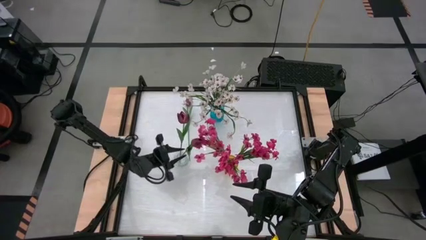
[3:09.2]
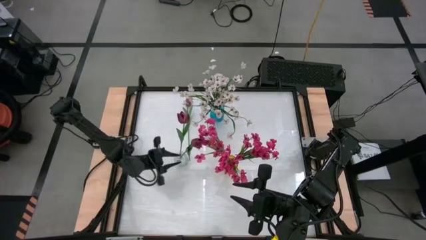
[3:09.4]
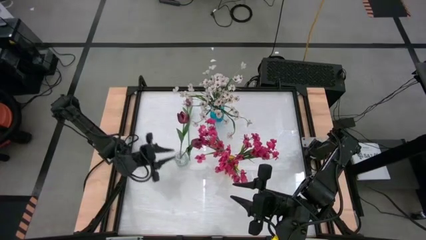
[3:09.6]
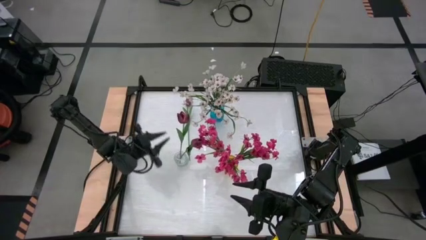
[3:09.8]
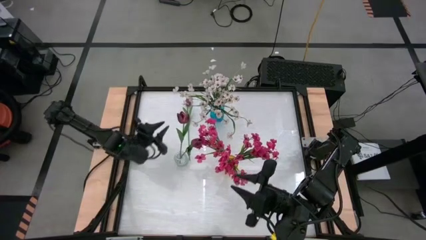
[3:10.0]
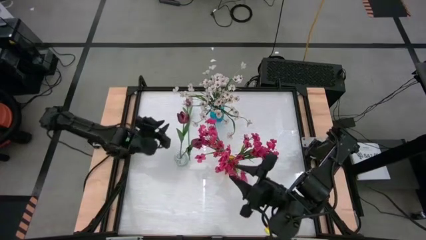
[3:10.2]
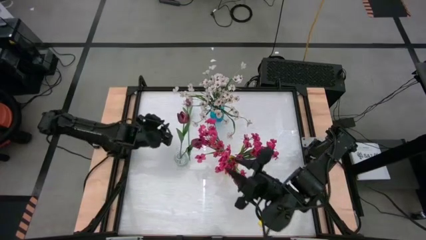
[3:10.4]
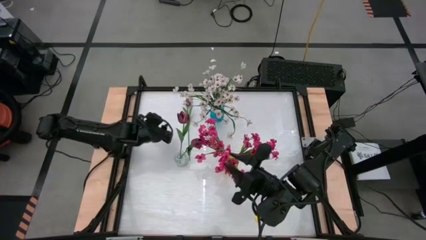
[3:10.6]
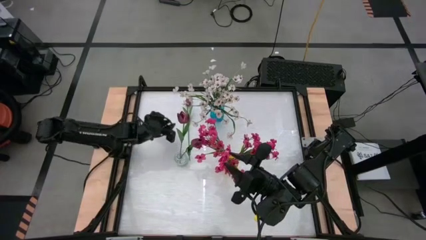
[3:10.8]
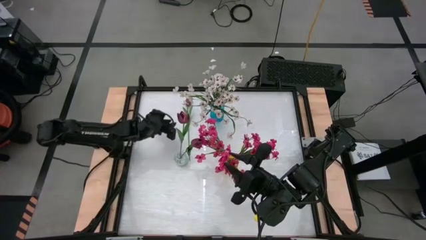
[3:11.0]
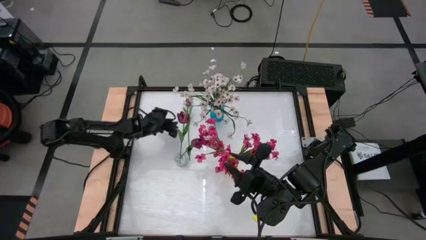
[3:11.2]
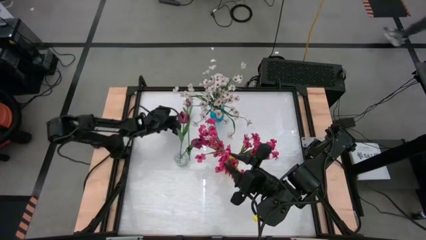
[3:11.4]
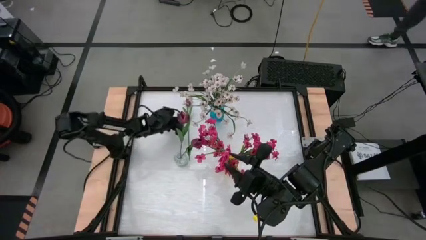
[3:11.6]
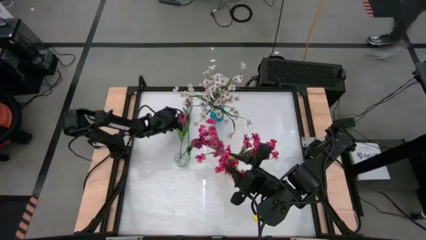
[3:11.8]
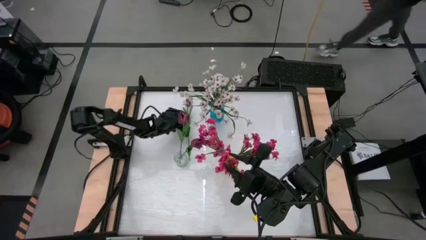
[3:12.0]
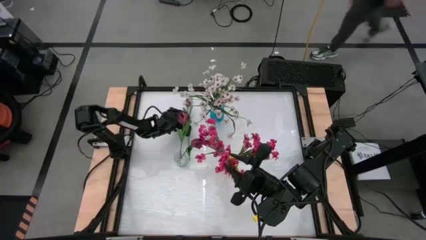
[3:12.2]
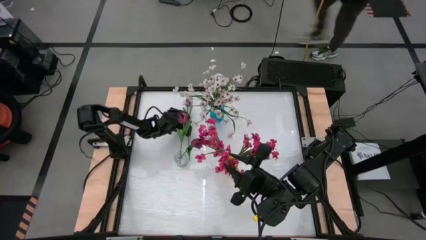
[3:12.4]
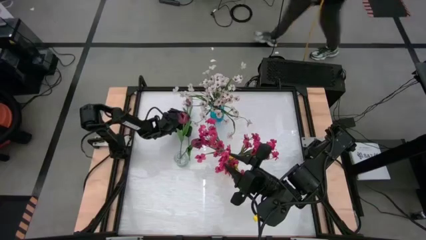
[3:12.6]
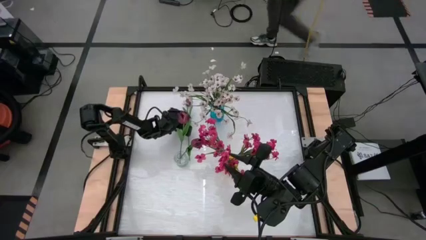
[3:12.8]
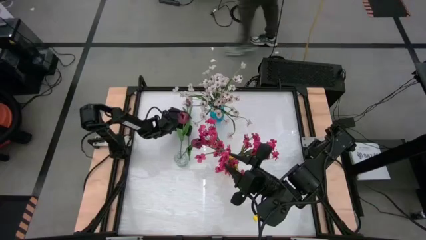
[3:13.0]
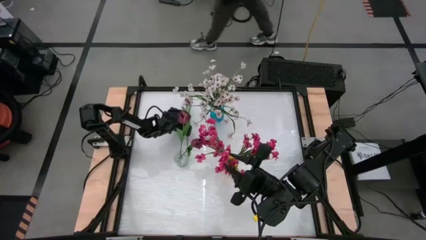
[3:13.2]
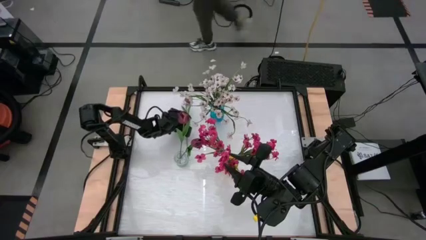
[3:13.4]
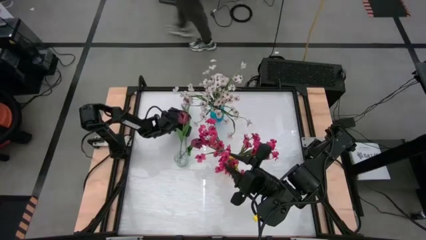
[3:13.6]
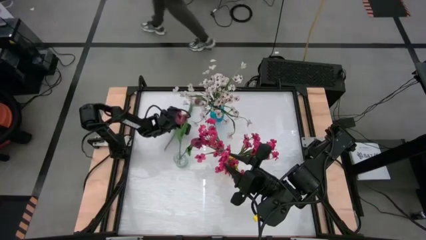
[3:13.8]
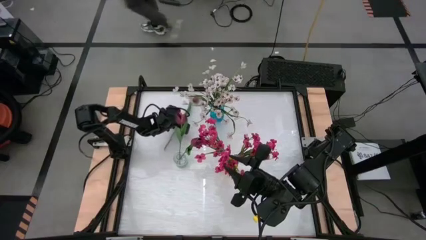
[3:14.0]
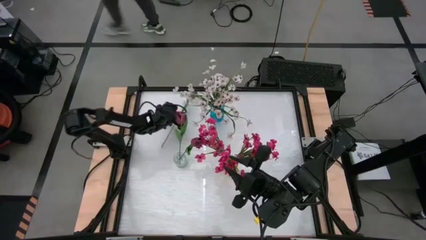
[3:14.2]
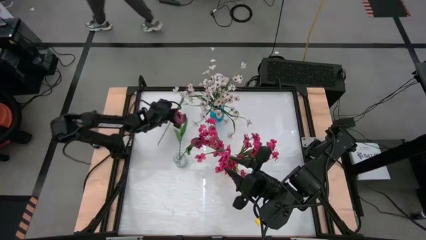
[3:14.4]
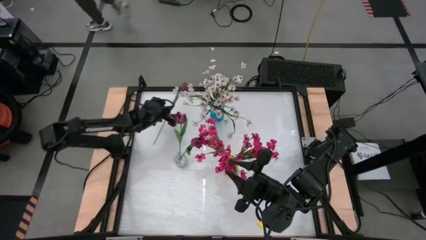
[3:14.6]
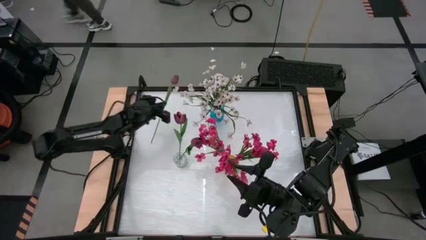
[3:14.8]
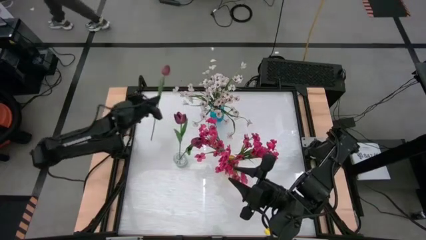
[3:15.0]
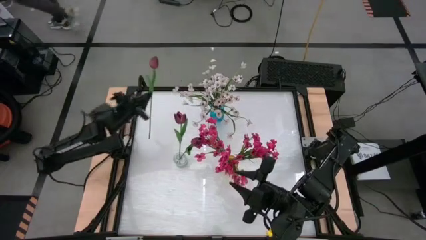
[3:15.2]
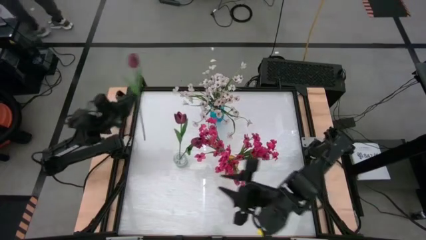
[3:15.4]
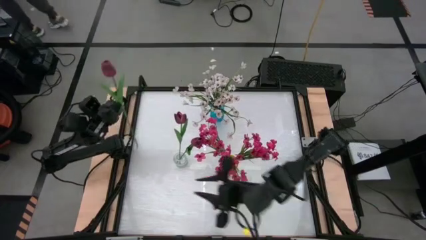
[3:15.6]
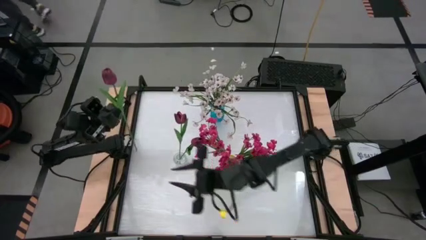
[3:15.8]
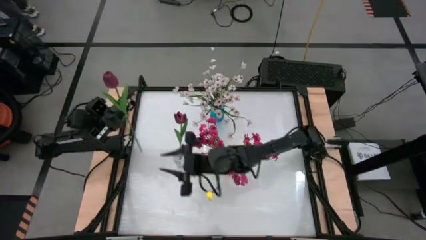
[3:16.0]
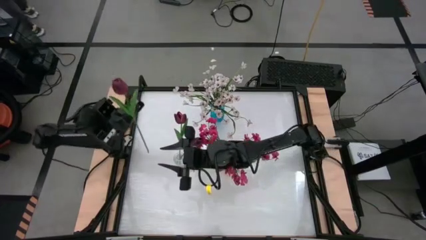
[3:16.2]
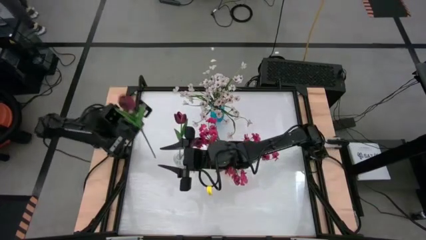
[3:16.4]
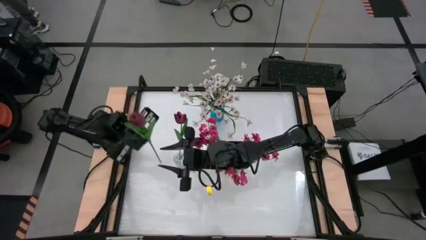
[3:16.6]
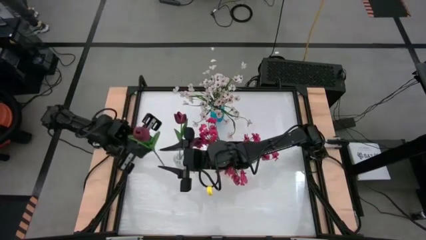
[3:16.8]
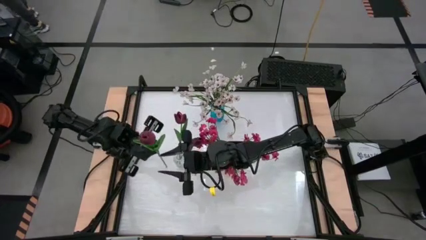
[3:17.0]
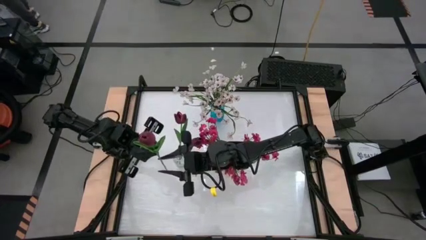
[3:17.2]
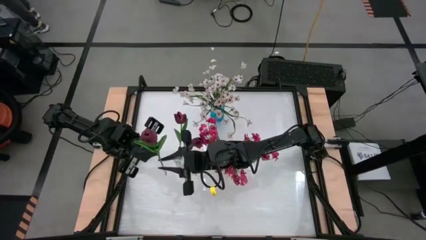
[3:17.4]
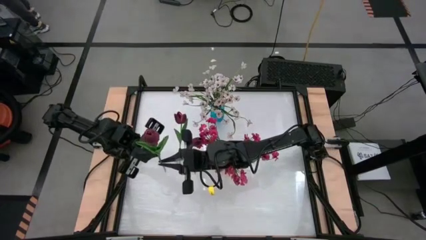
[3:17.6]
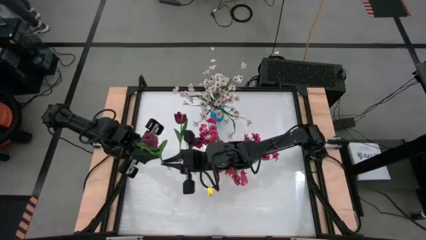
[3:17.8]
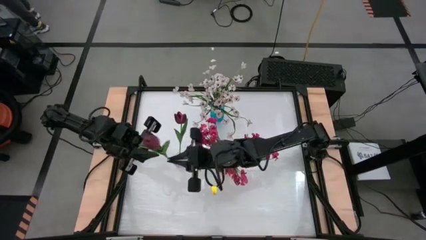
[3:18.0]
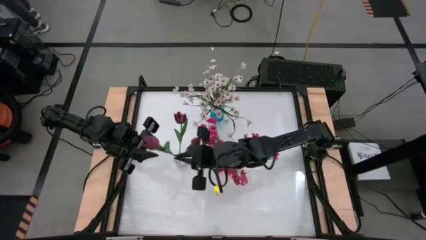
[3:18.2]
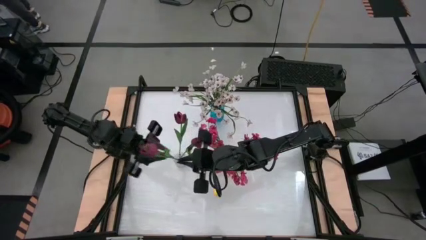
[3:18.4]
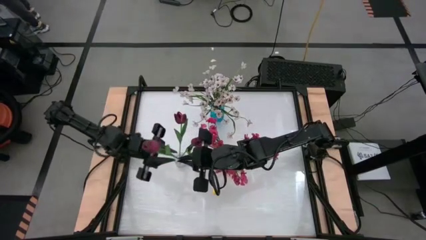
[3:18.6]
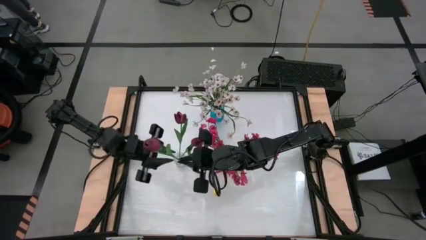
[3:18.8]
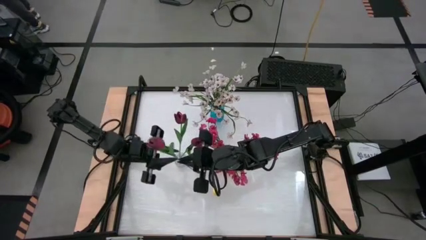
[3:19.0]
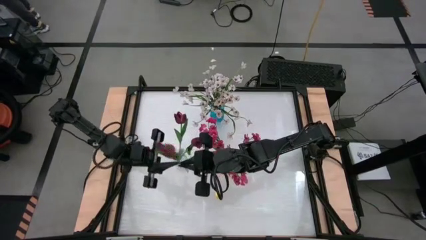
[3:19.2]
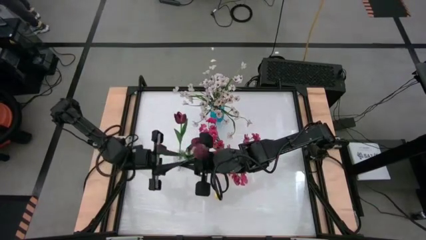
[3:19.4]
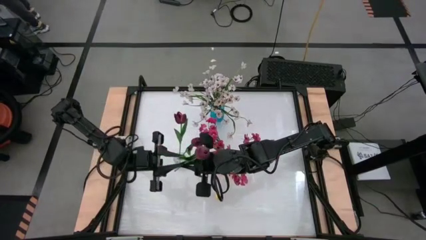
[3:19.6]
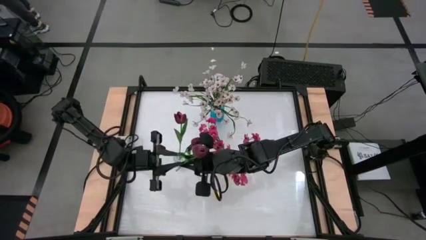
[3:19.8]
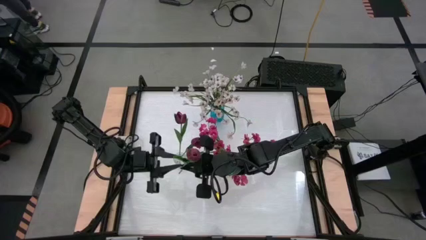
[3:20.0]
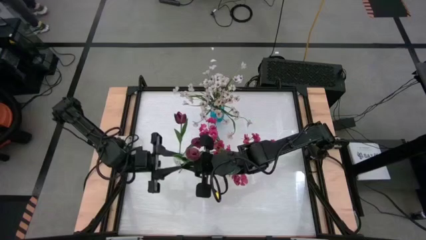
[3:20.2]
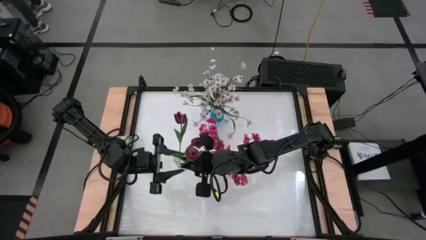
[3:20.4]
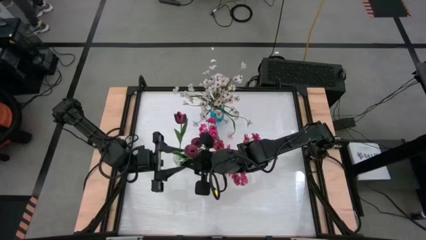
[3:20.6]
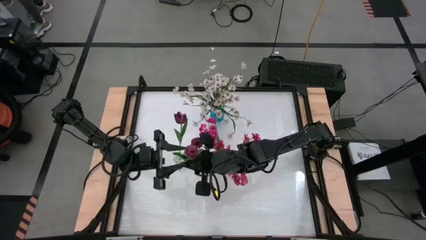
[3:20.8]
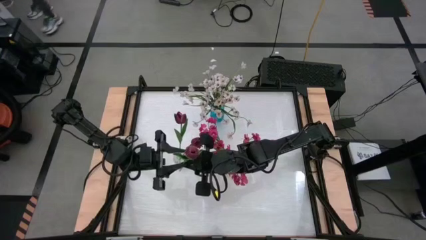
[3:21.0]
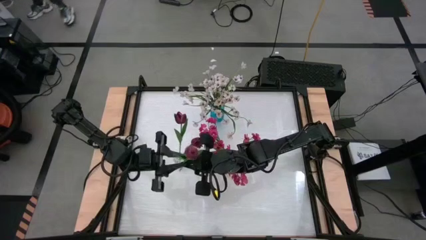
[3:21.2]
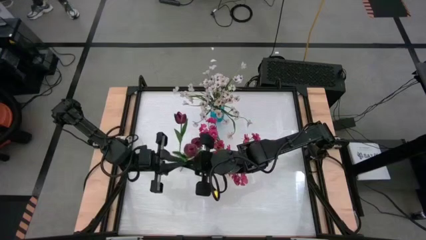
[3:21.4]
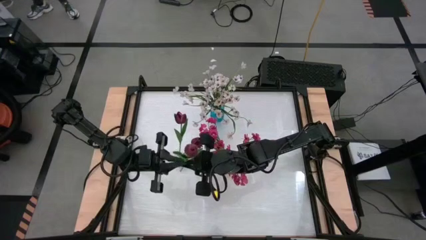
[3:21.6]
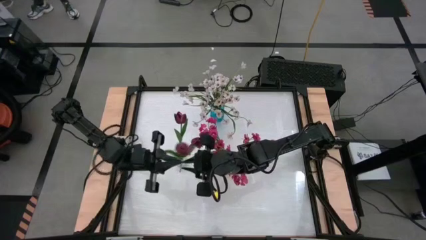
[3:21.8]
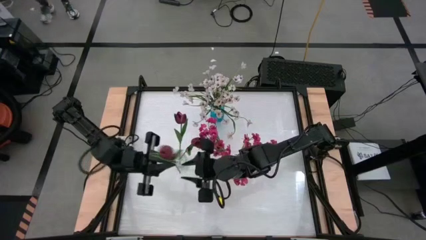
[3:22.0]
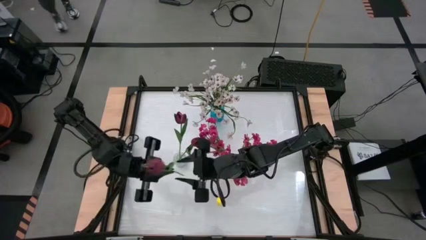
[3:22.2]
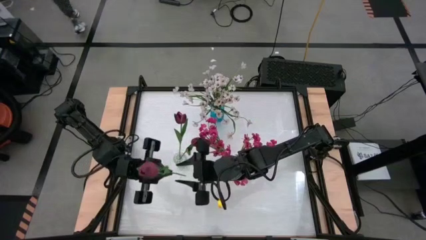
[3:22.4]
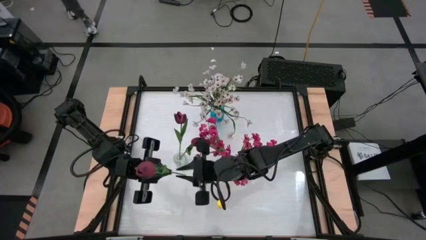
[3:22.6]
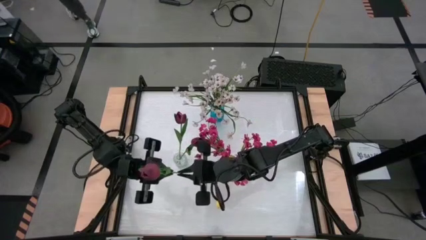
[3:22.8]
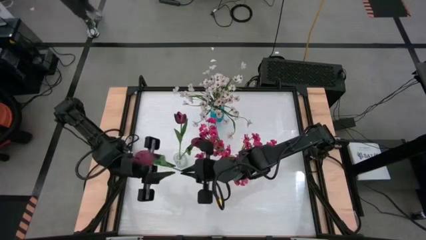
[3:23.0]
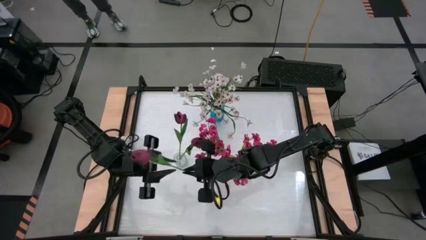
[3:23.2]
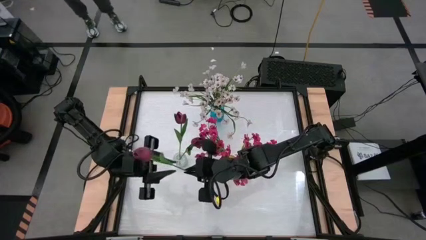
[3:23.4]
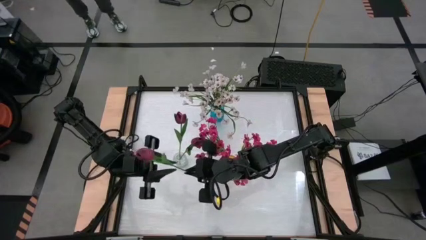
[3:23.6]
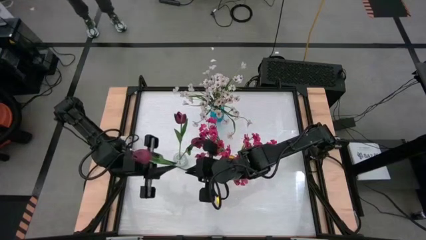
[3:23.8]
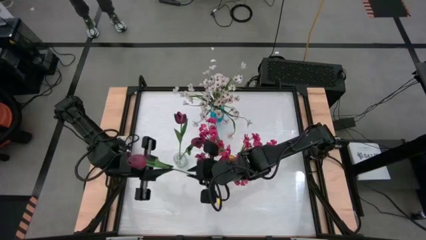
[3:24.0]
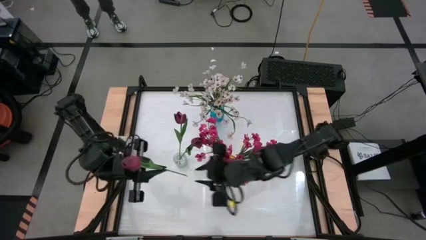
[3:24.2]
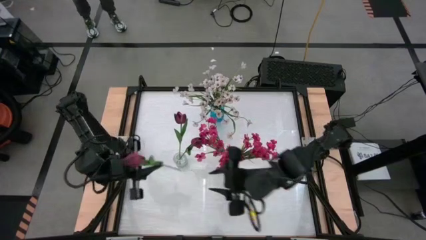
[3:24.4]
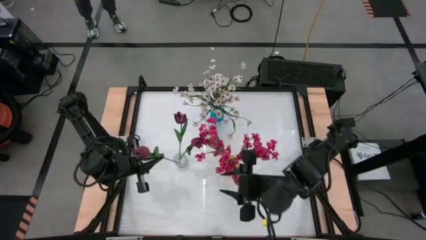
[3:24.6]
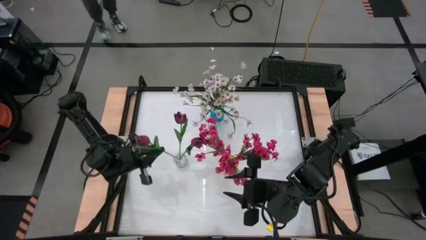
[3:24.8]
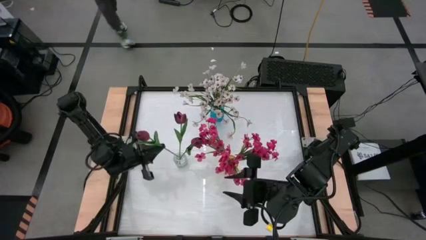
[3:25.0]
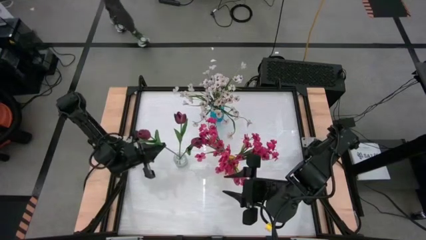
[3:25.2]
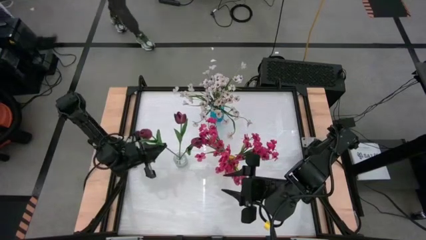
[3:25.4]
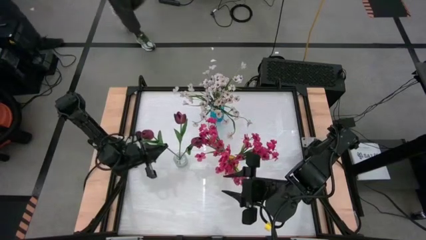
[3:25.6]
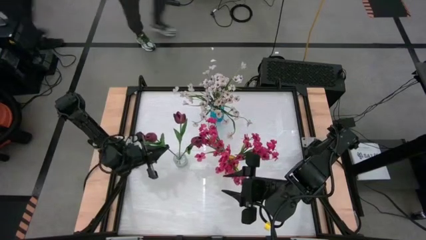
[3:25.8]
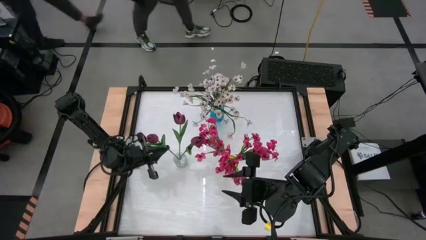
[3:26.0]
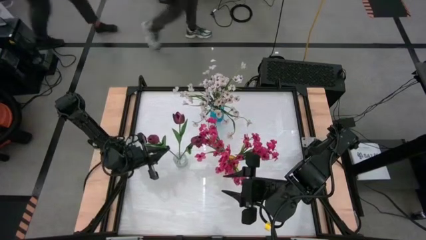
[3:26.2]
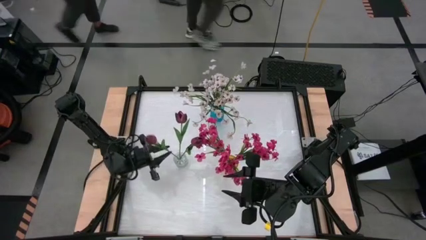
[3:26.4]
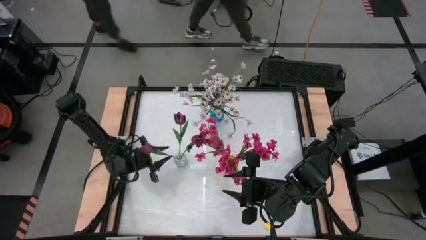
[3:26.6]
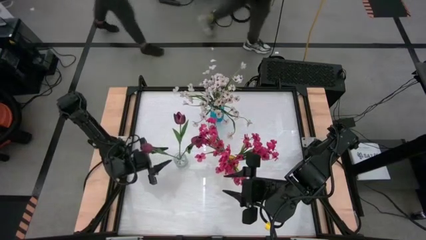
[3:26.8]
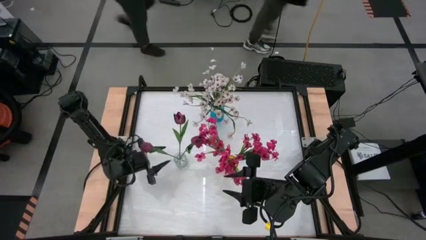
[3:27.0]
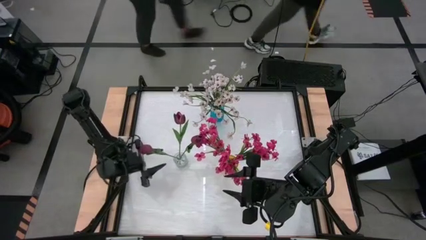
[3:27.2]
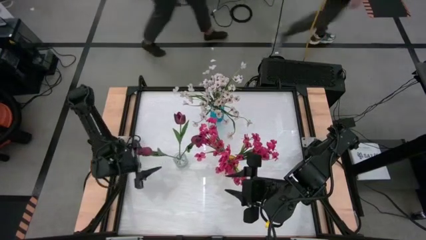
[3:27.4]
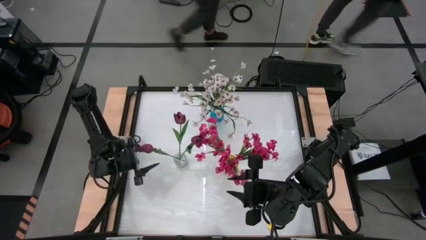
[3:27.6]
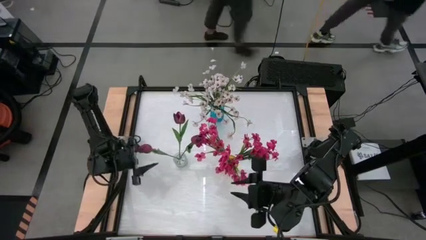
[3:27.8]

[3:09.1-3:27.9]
Task: Sort flowers into vase by color
Put the red flower into the transparent vase
